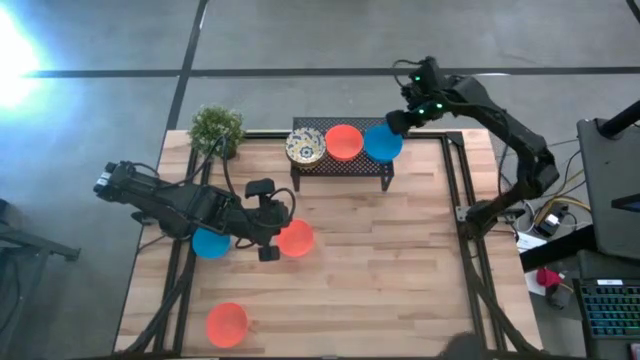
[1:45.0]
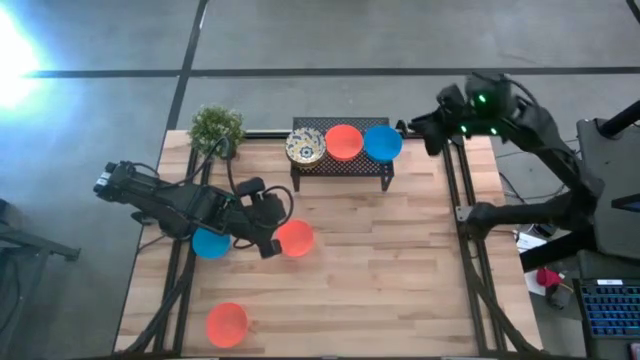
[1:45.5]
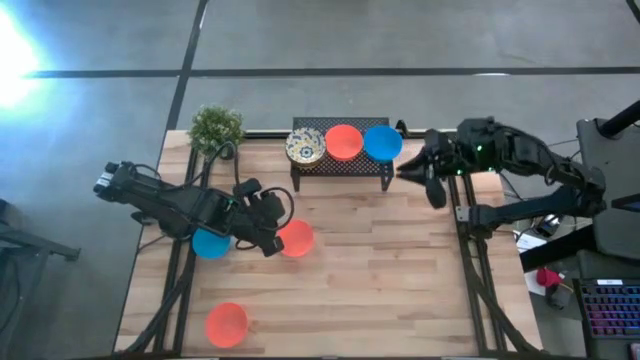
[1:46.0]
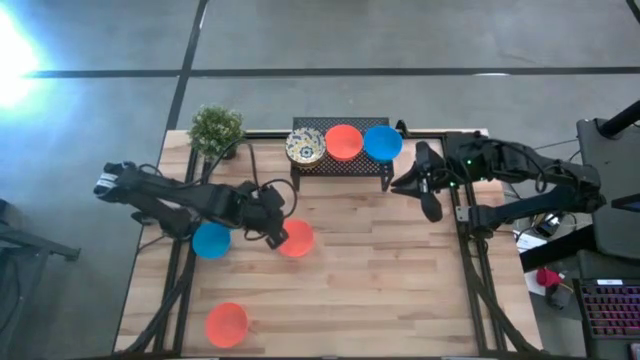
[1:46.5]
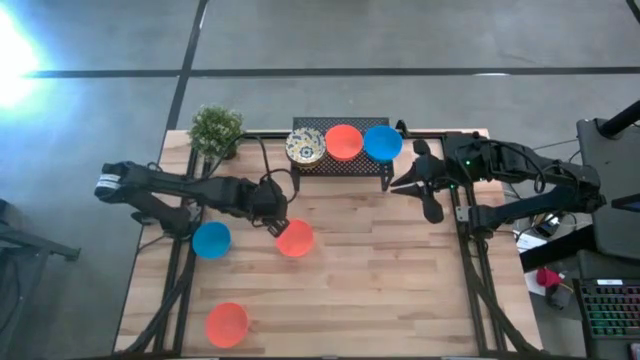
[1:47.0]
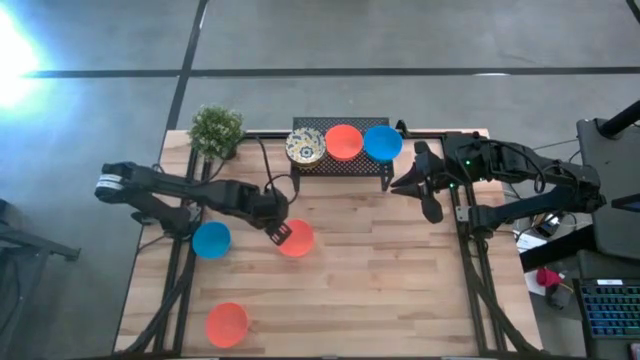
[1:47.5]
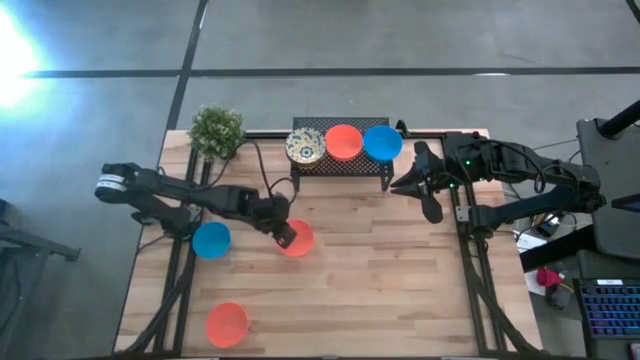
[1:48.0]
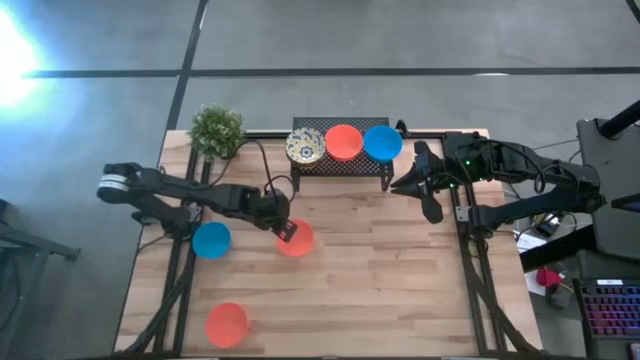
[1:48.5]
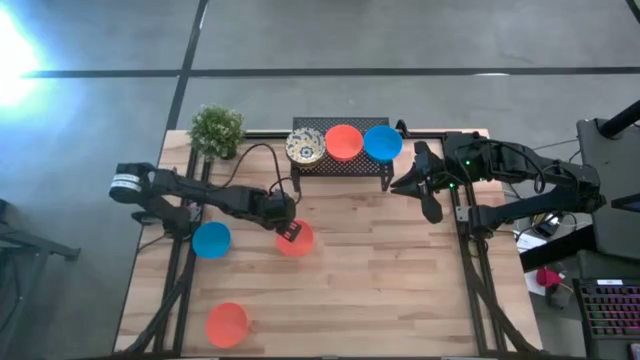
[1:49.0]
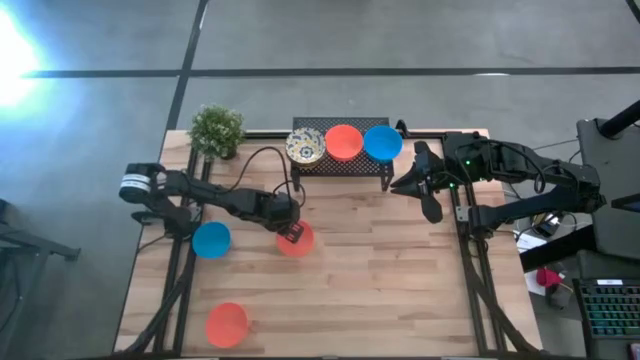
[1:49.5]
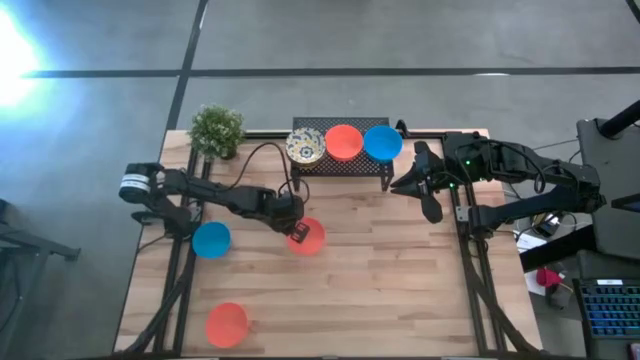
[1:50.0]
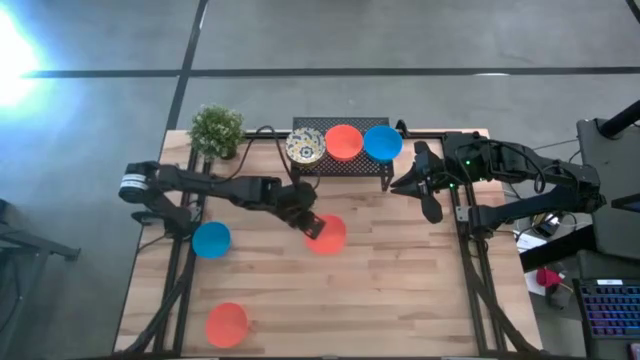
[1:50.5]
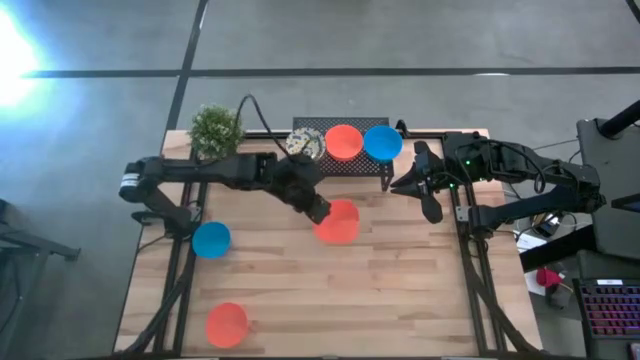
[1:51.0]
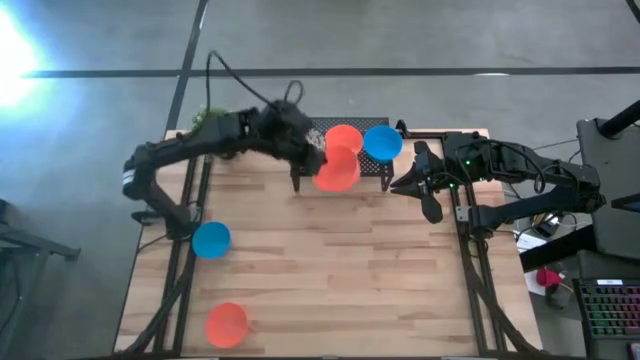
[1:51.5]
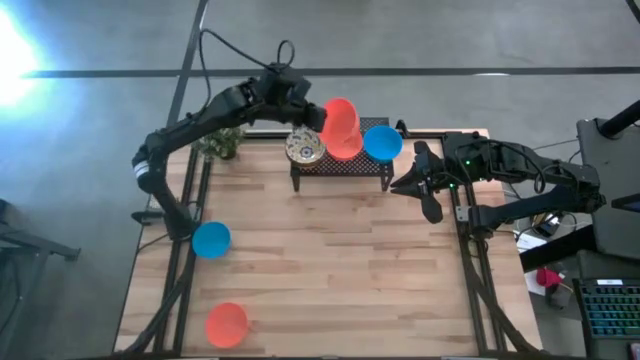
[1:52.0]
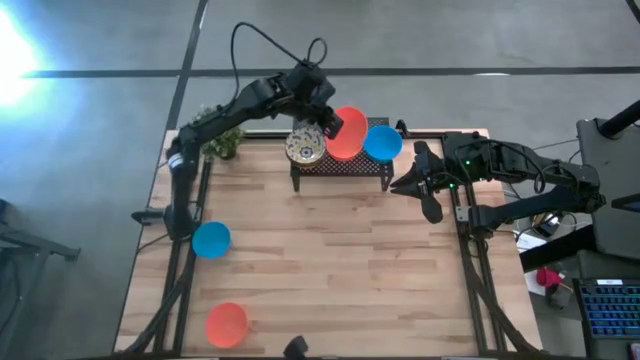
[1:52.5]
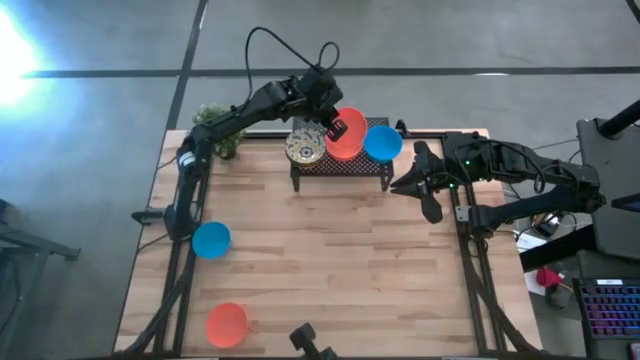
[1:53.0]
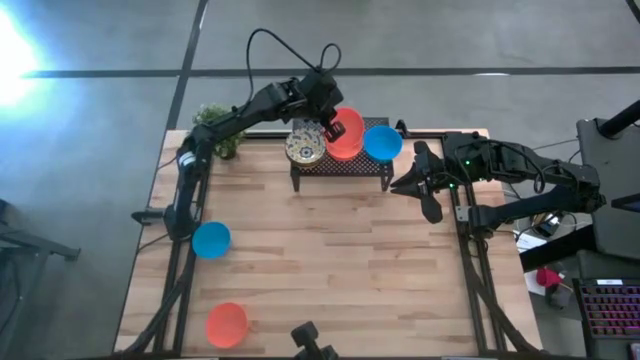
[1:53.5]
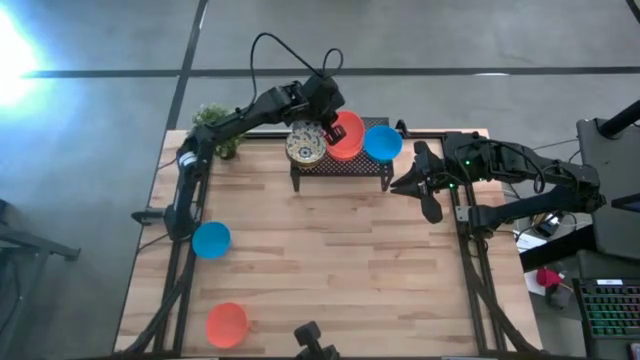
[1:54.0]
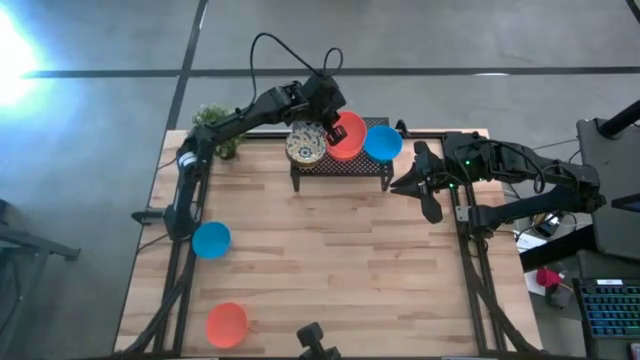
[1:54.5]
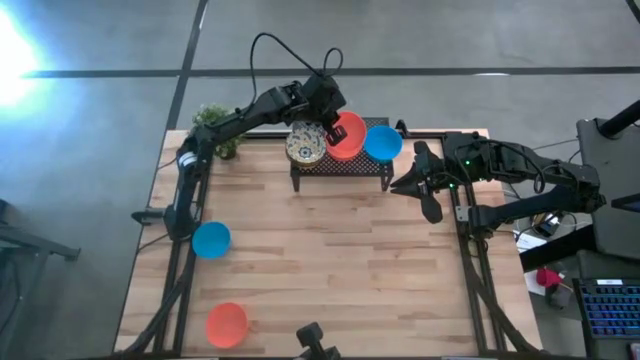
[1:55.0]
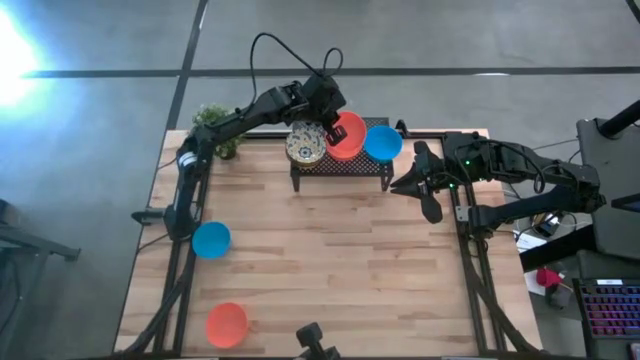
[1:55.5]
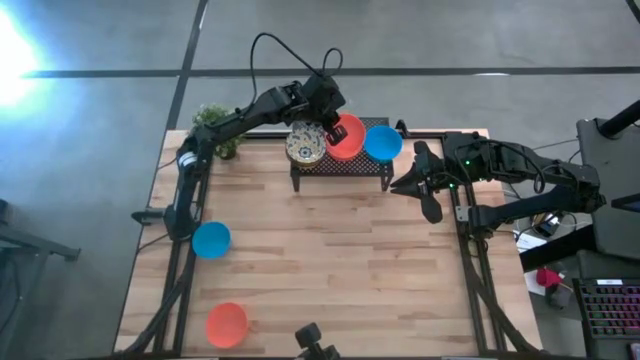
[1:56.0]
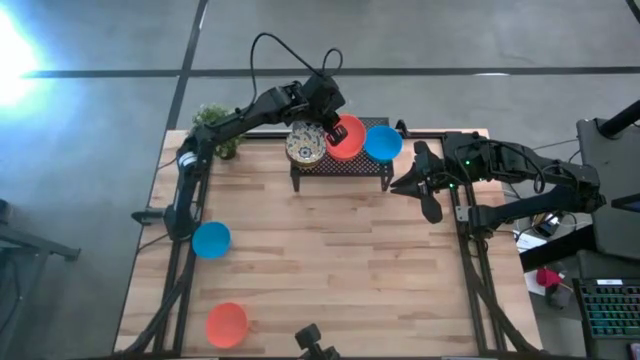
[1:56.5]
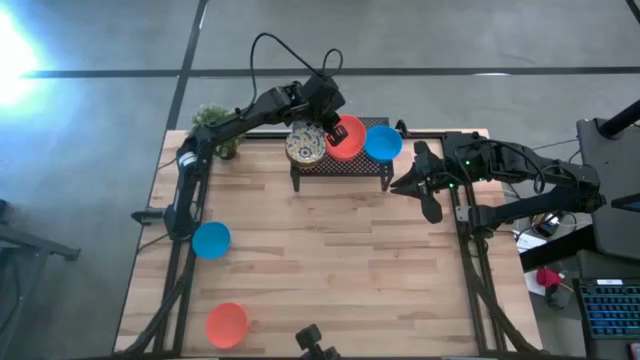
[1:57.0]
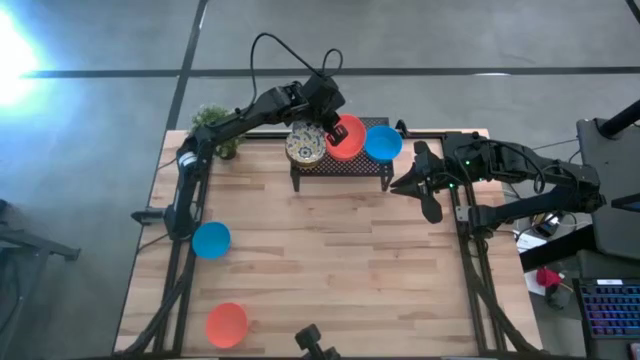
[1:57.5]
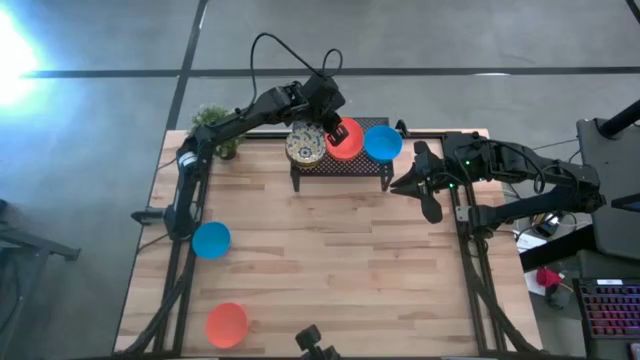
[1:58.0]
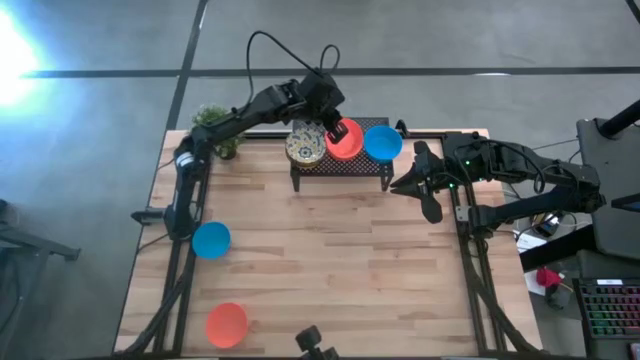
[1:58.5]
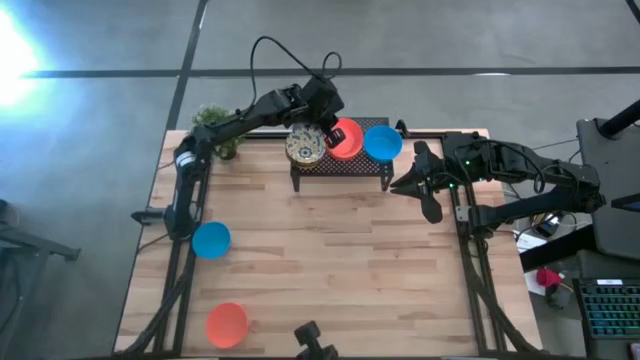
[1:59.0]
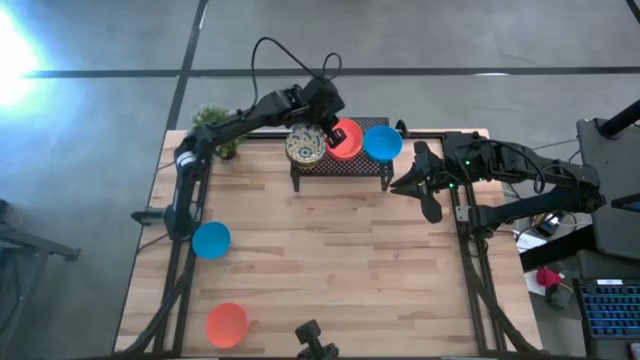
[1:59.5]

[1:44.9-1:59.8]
Task: Pick & Place Mini bowls
Stack the top orange bowl on the orange bowl on the shelf

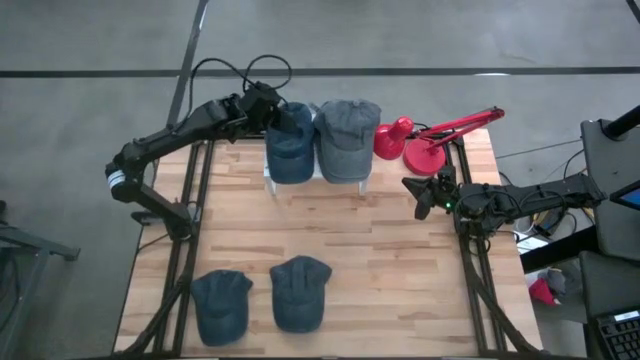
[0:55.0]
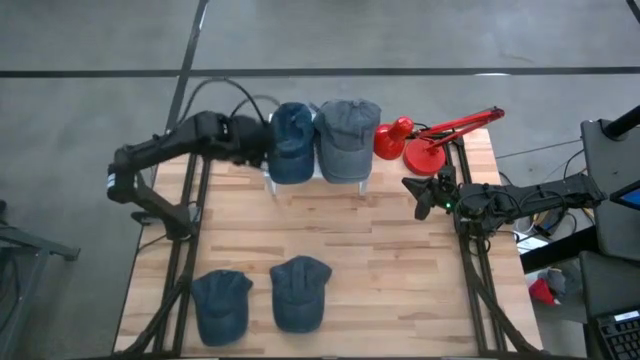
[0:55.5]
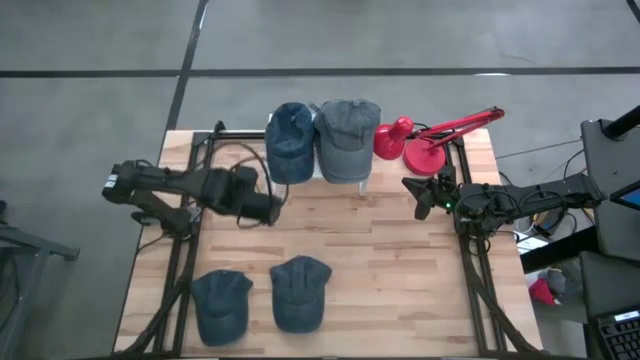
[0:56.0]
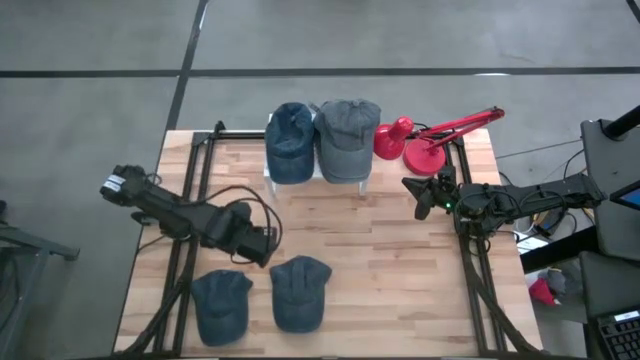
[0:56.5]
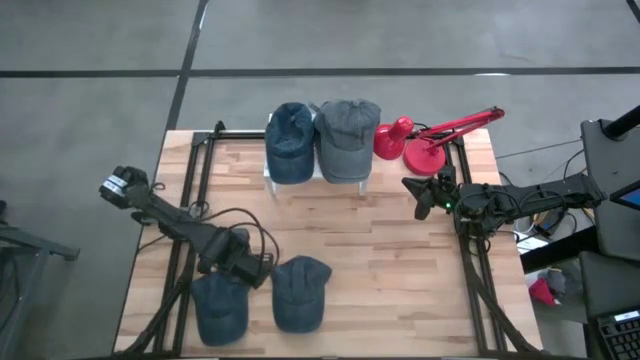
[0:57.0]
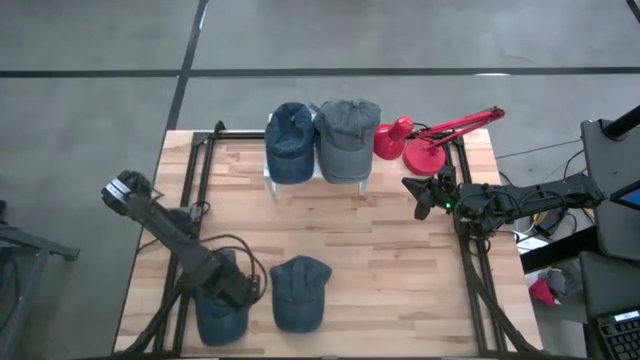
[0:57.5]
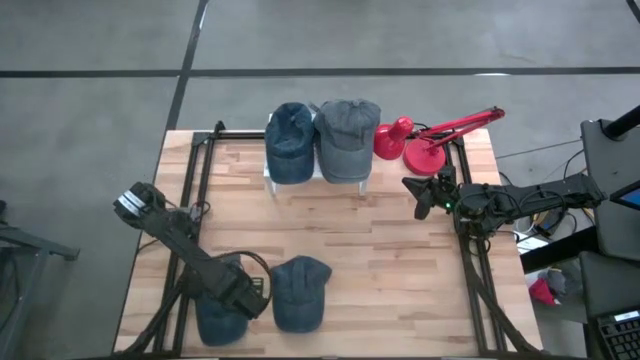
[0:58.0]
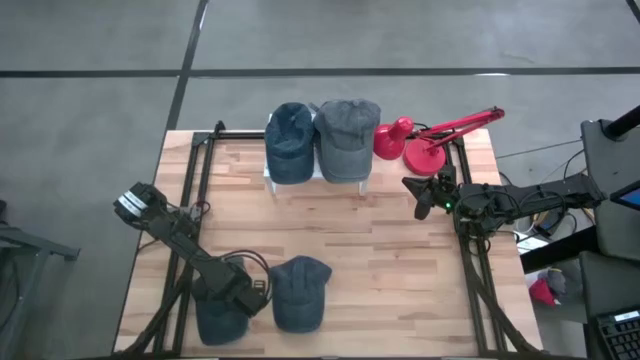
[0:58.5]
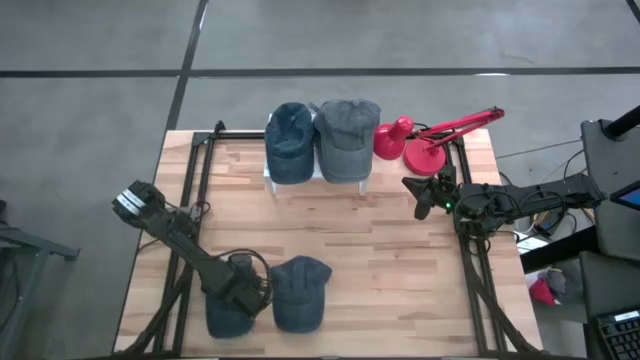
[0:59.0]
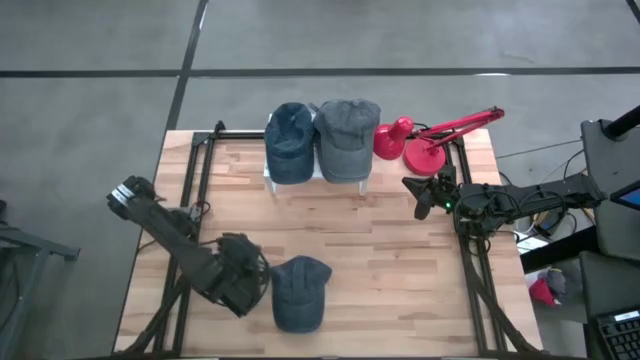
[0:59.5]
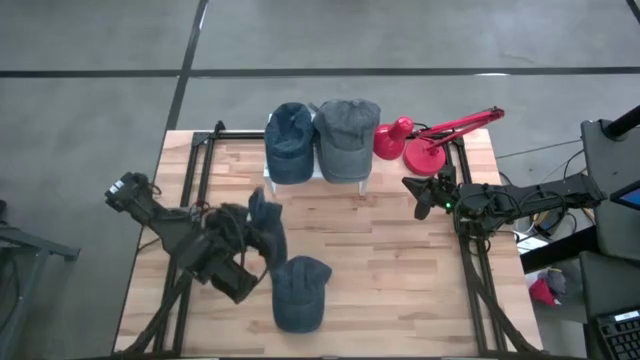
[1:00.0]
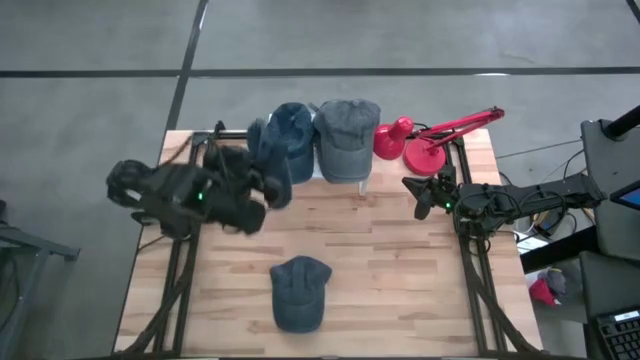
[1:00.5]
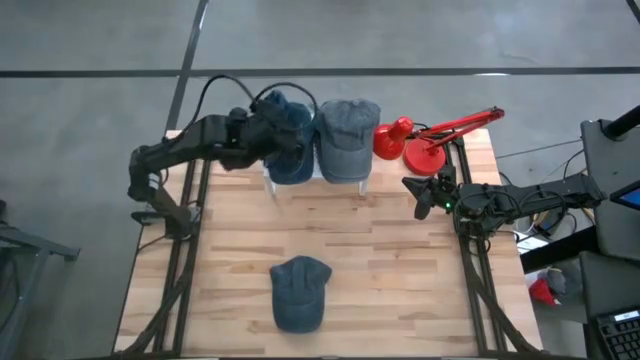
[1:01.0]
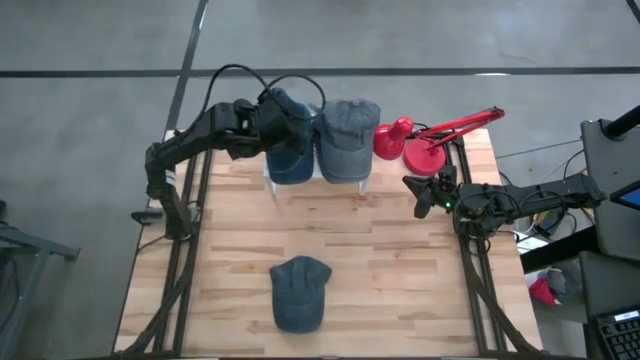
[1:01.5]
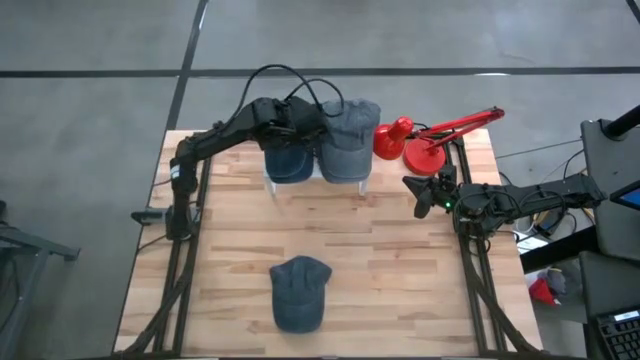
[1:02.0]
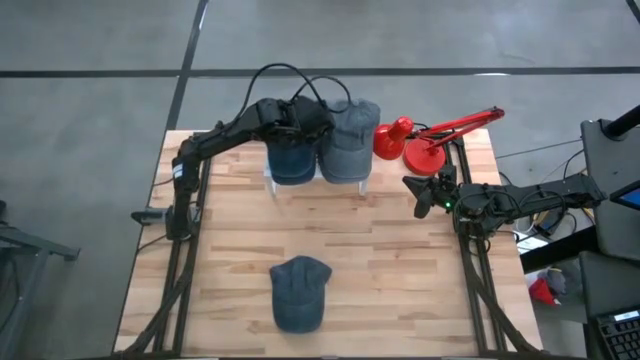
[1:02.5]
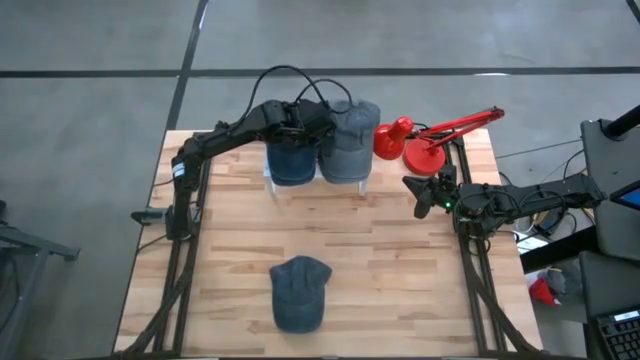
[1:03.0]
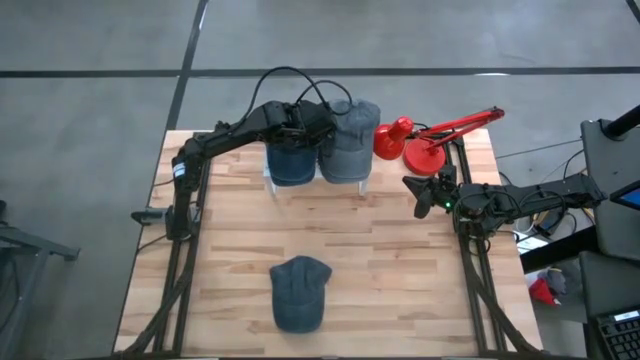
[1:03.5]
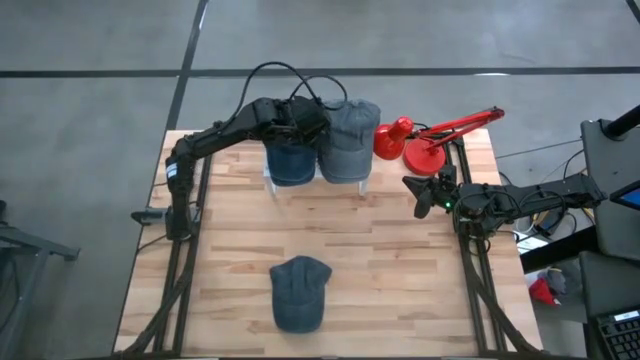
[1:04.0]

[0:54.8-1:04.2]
Task: Stack small to large cups/mugs on shelf
Stack the left blue cup on the other blue cup on the shelf
